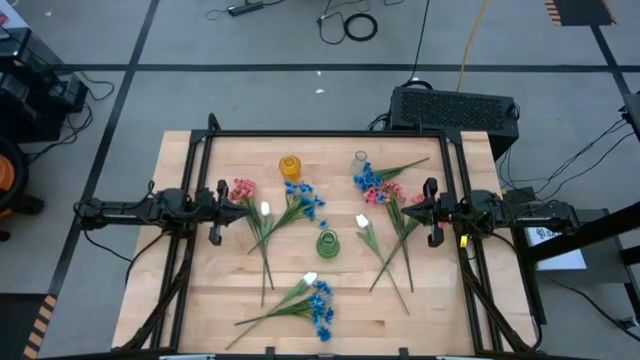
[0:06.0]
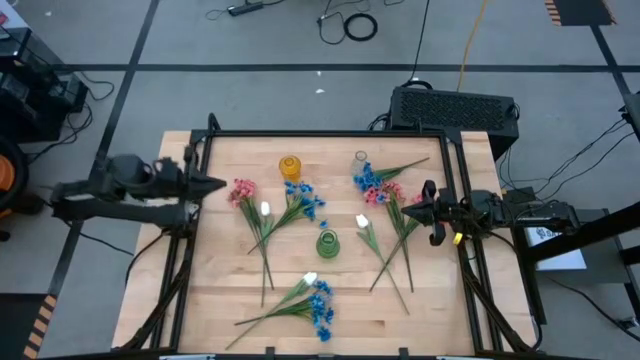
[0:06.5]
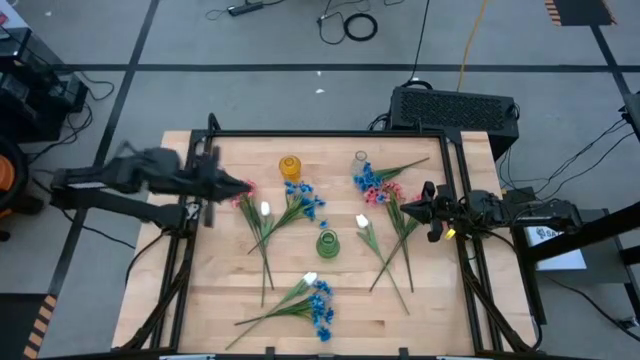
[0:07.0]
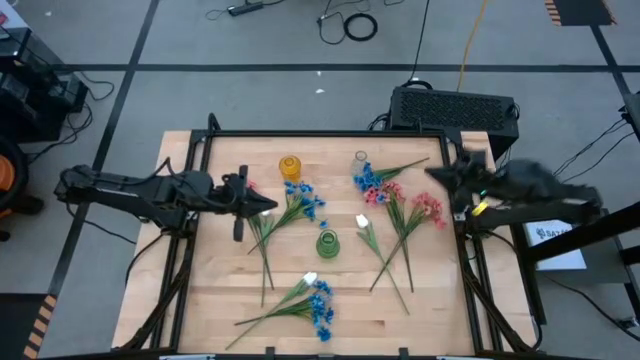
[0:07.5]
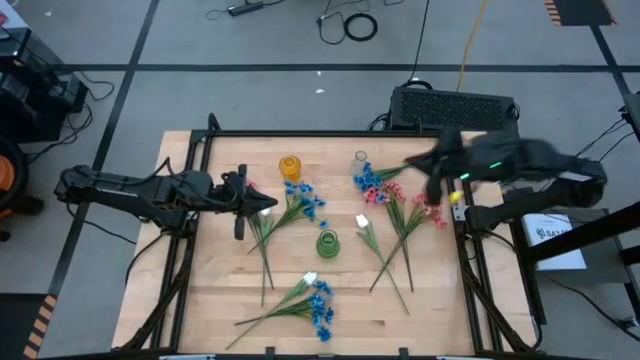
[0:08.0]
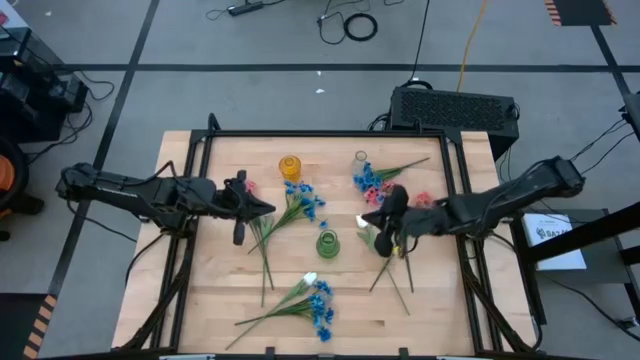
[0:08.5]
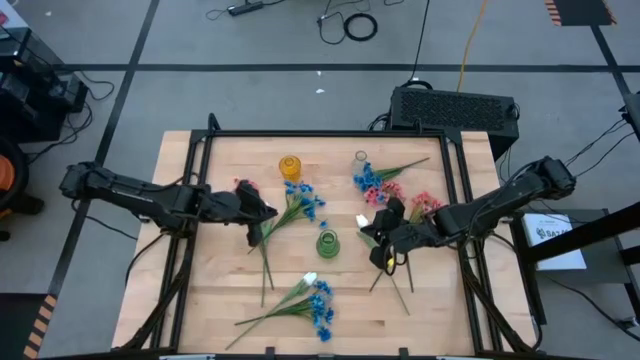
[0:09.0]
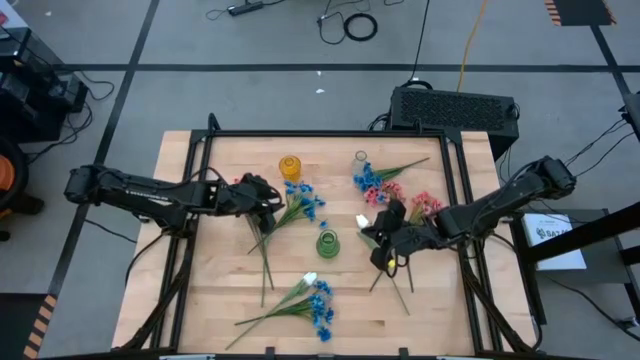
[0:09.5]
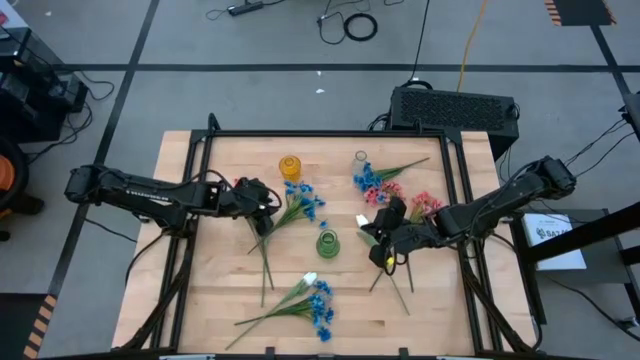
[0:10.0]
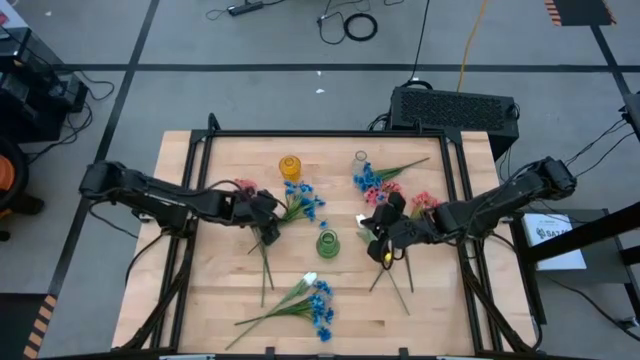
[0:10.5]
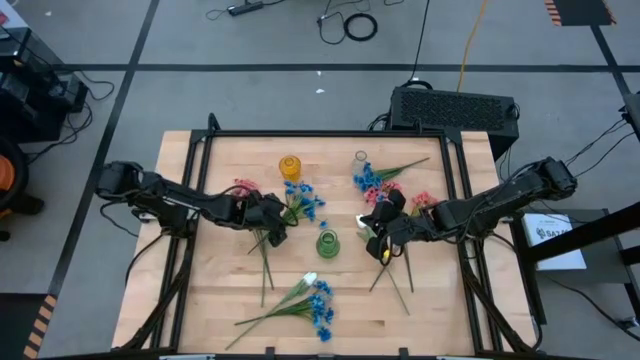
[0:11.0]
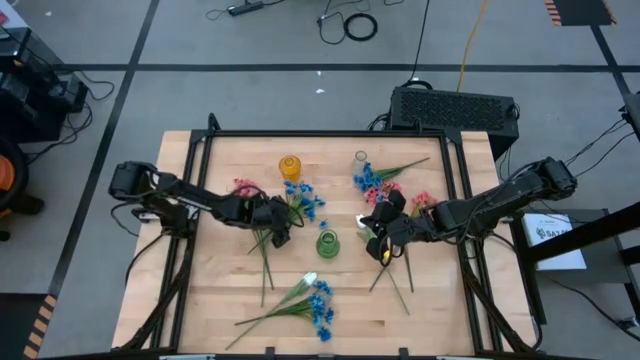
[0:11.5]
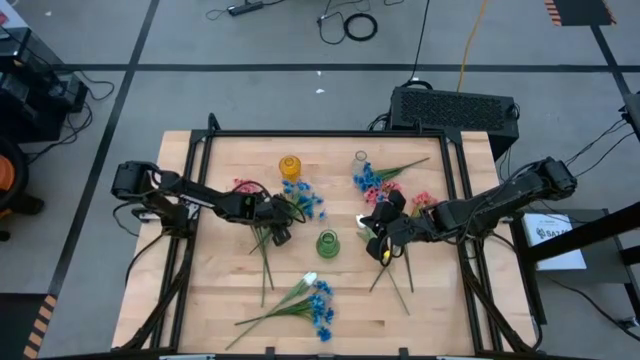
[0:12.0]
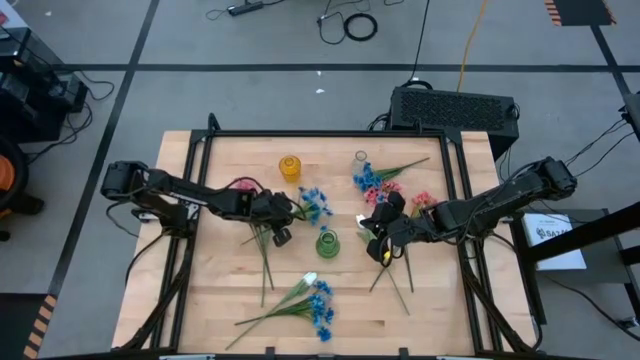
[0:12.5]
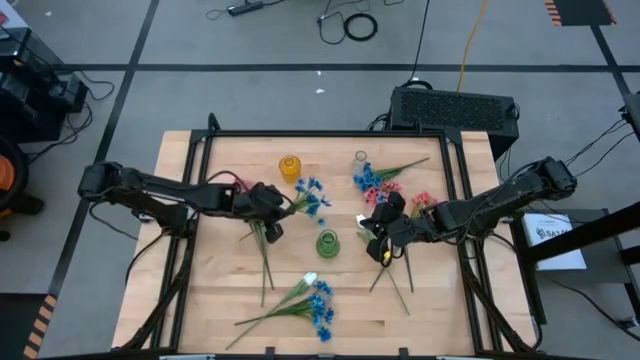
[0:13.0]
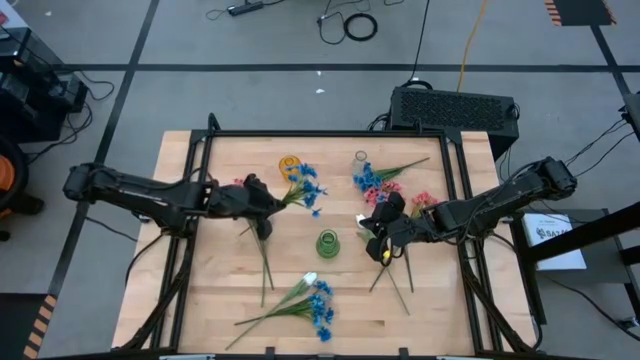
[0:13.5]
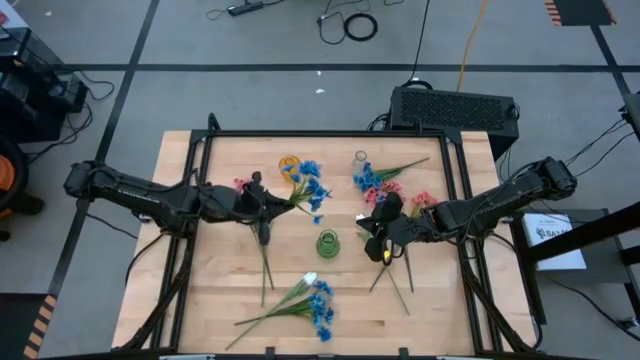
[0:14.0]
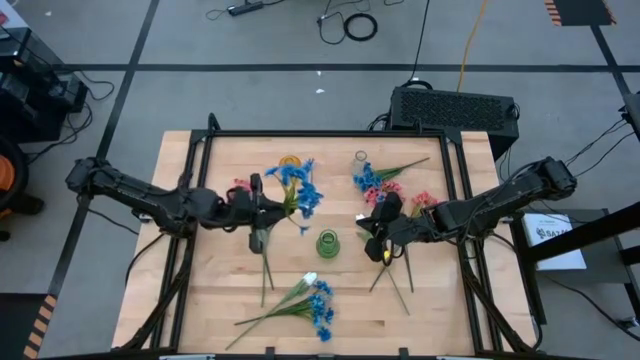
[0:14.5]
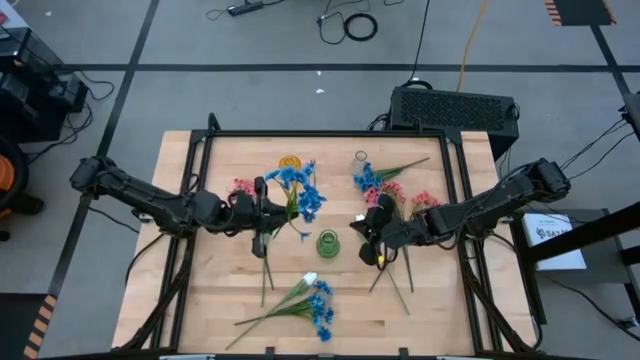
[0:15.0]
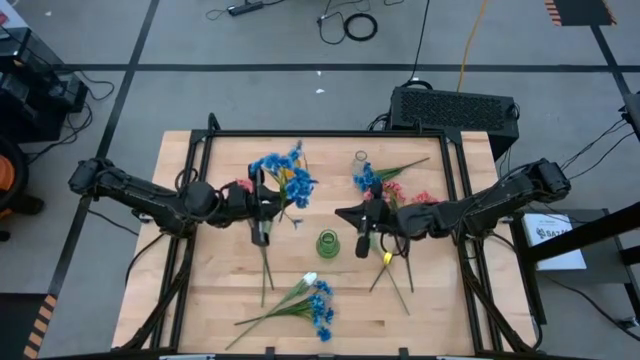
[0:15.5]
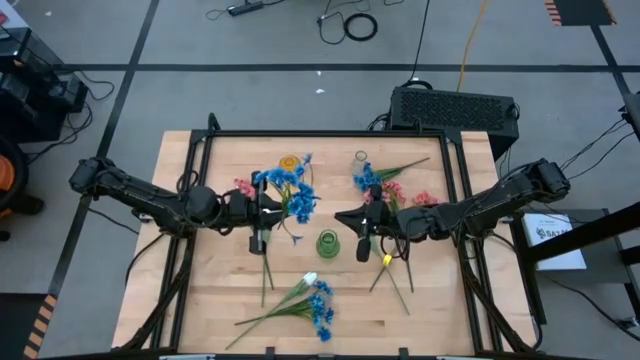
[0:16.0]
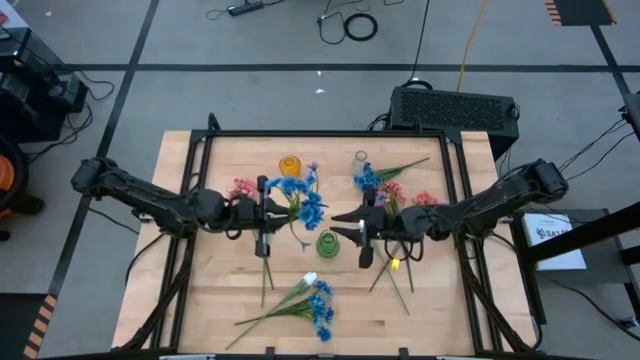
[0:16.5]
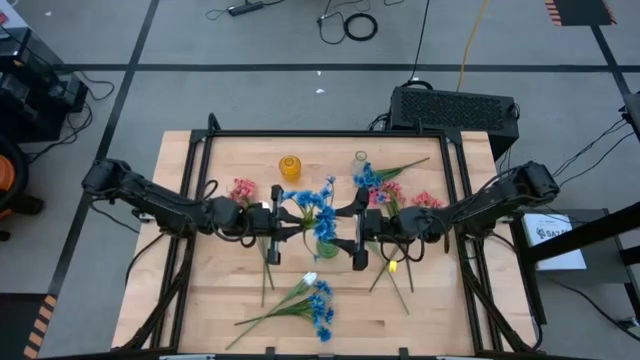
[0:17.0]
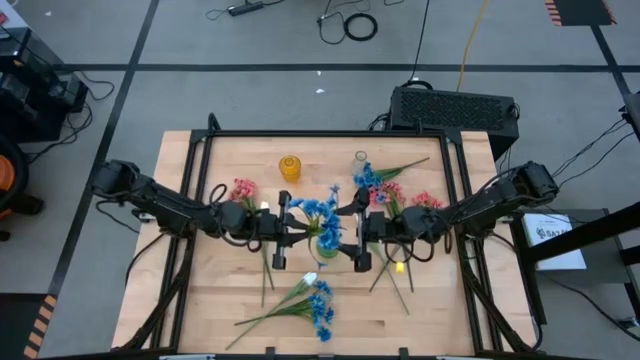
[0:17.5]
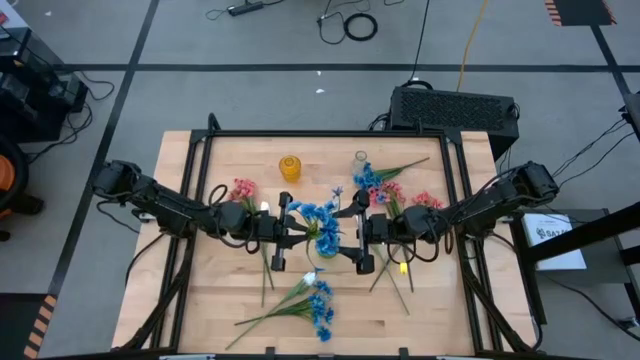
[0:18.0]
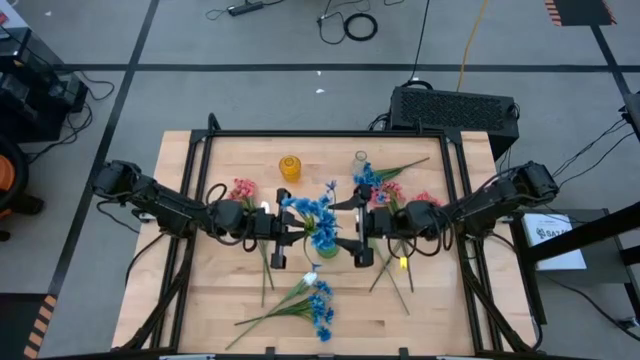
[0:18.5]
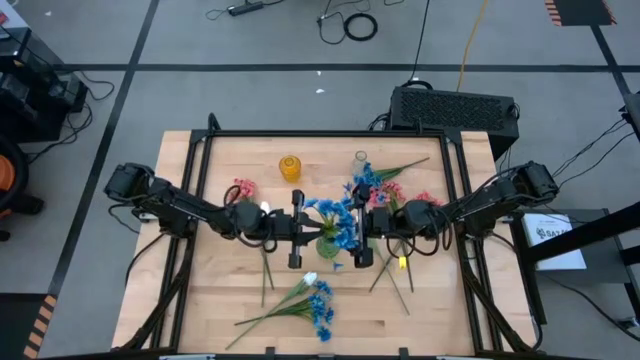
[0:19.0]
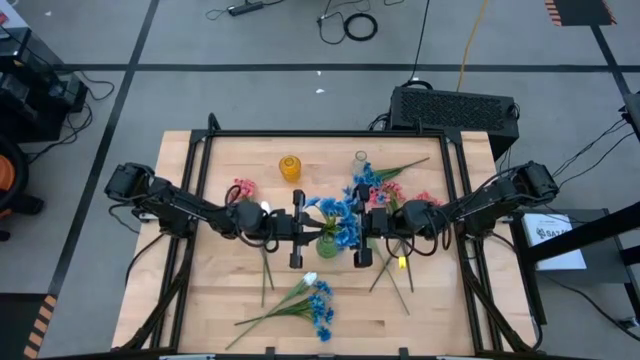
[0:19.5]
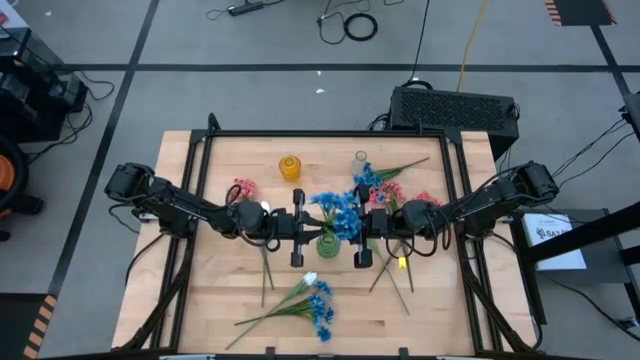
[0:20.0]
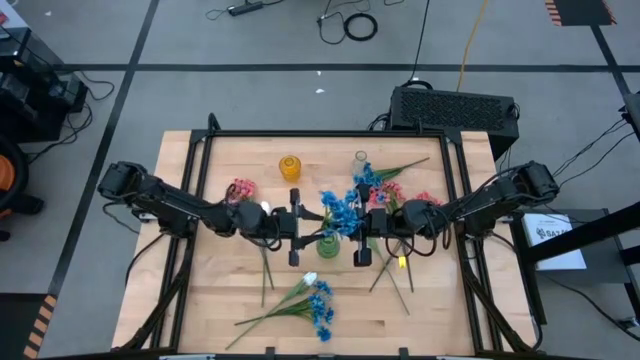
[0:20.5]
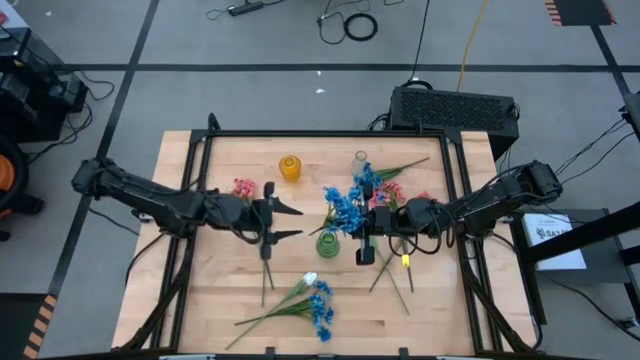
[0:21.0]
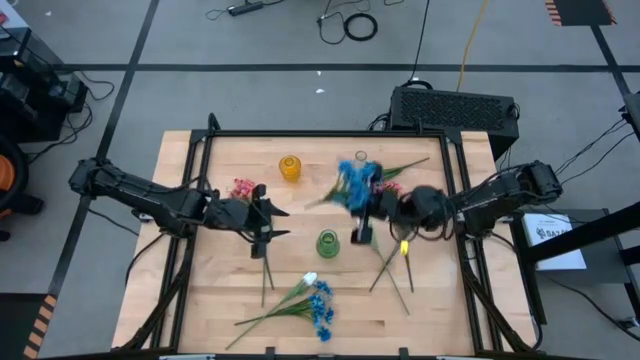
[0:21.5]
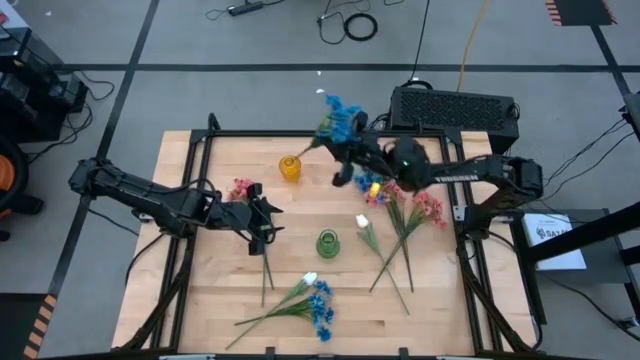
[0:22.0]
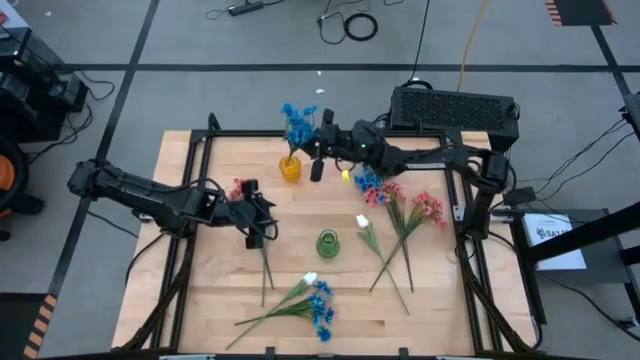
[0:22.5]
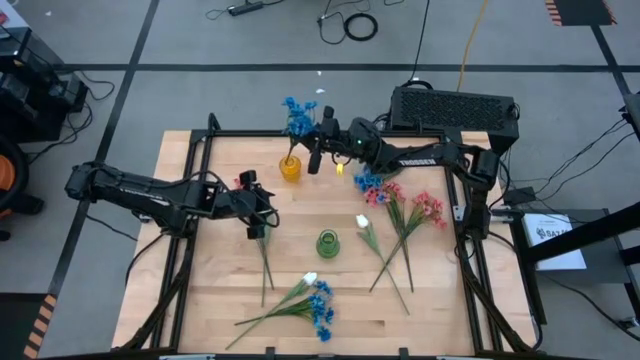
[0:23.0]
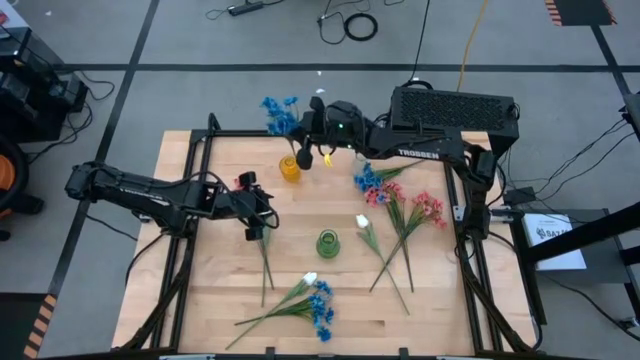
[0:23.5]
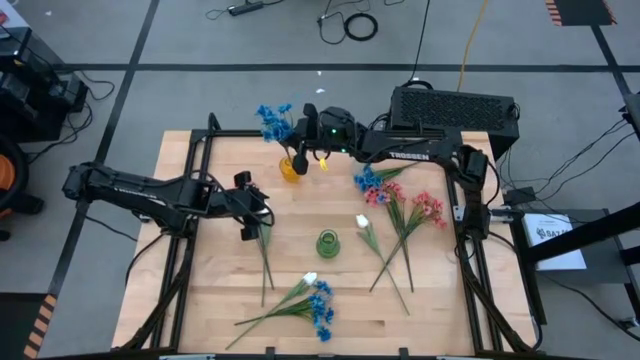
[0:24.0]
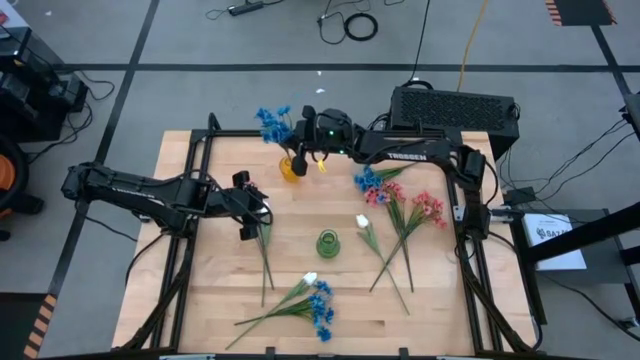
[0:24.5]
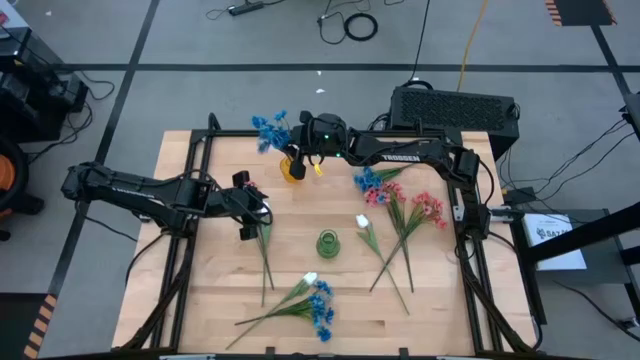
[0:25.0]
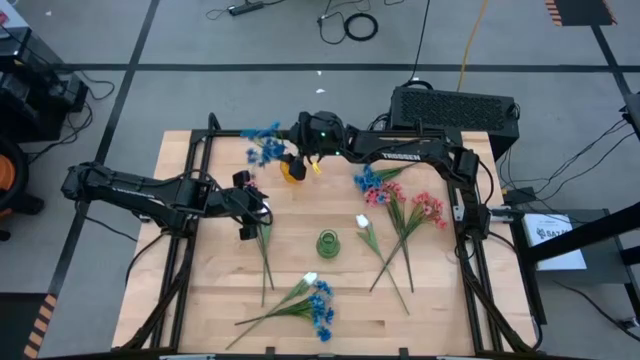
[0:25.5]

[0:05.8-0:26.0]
Task: Sort flowers into vase by color
Put the top left blue flowers into the yellow vase
